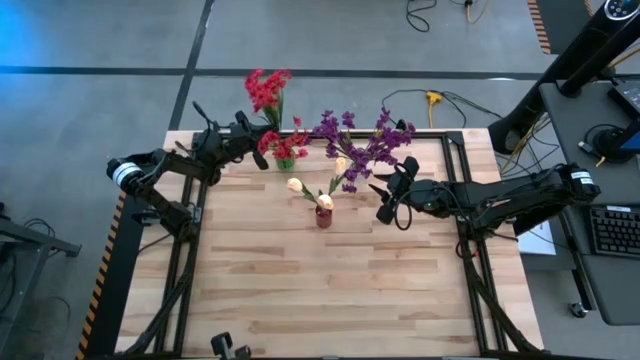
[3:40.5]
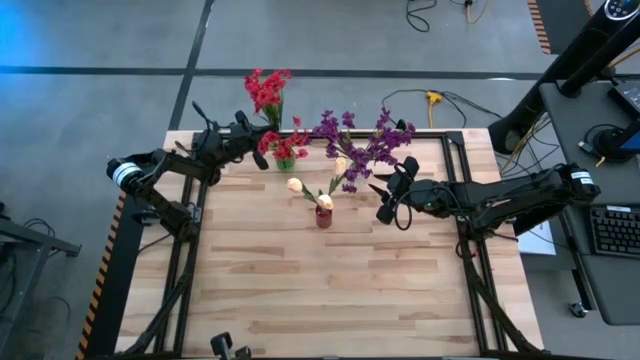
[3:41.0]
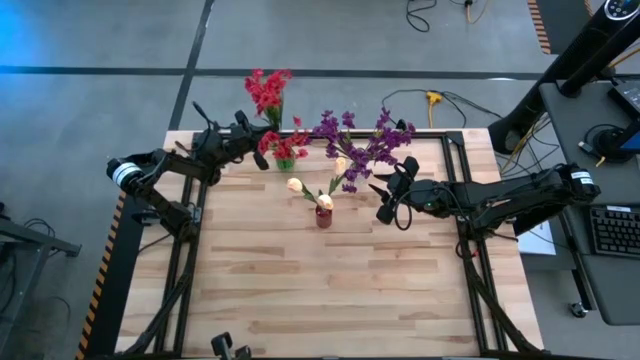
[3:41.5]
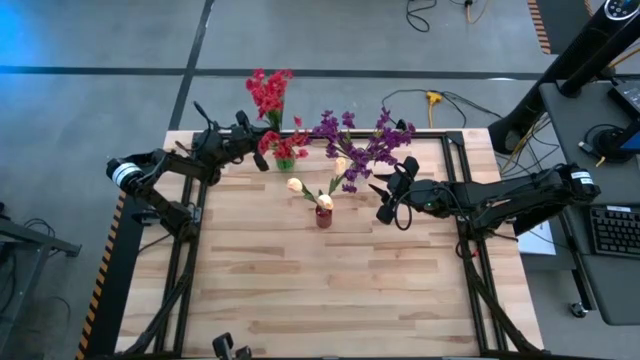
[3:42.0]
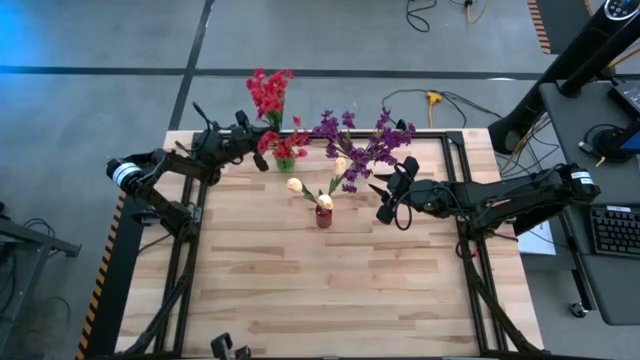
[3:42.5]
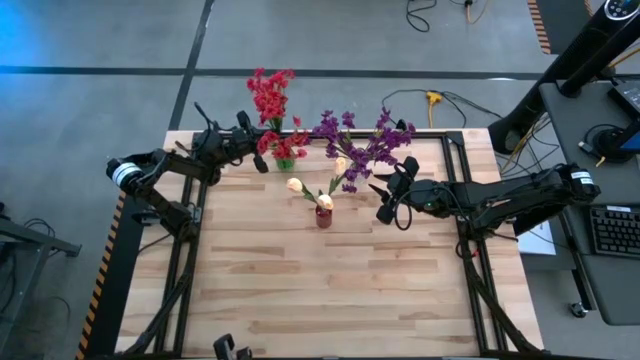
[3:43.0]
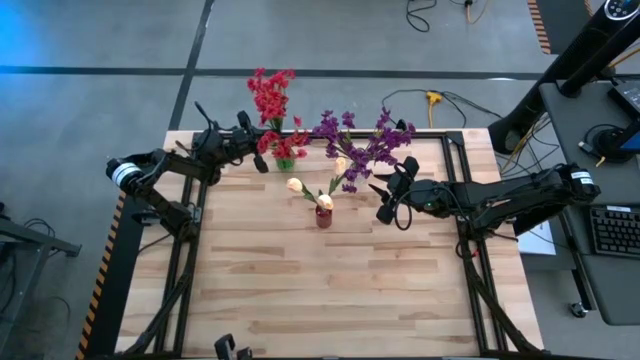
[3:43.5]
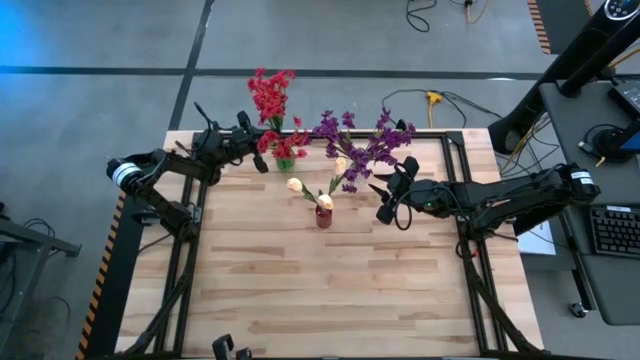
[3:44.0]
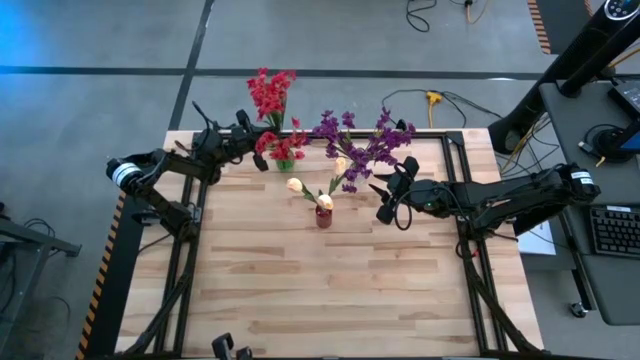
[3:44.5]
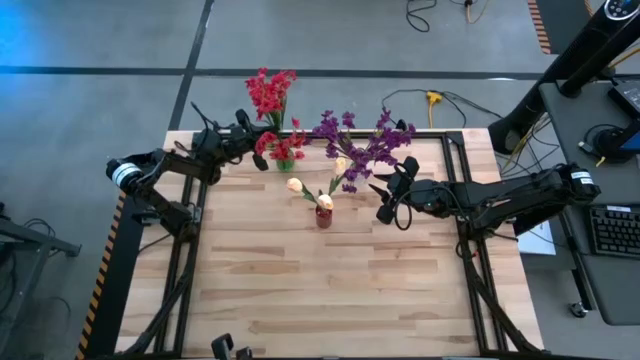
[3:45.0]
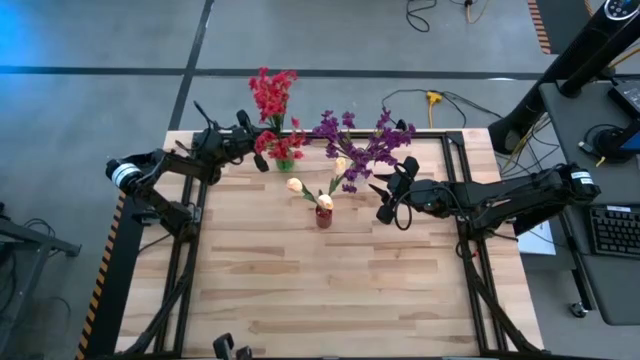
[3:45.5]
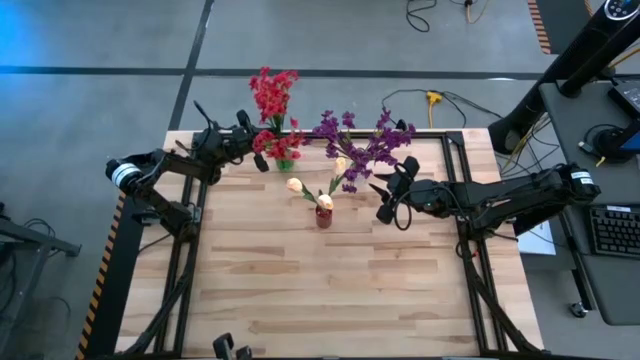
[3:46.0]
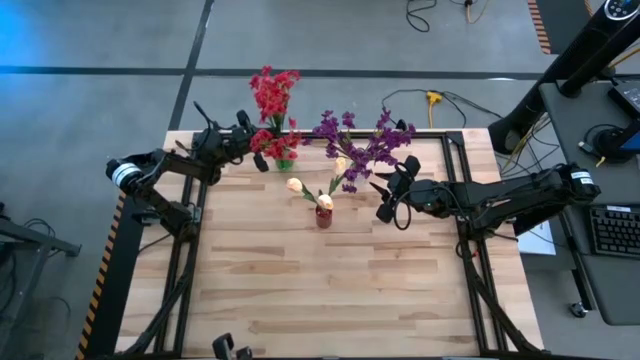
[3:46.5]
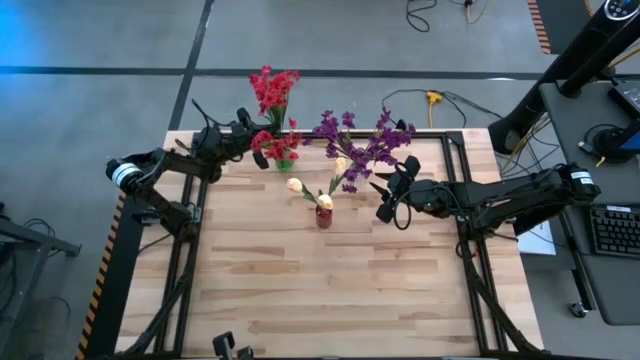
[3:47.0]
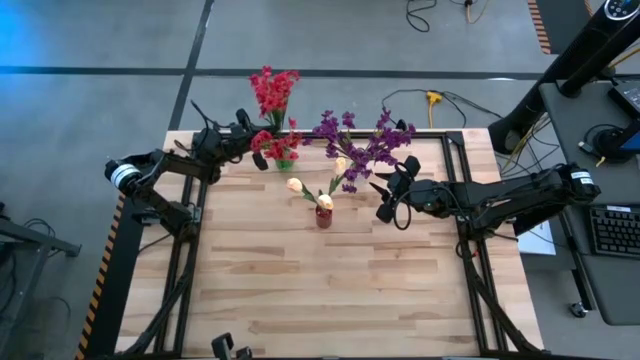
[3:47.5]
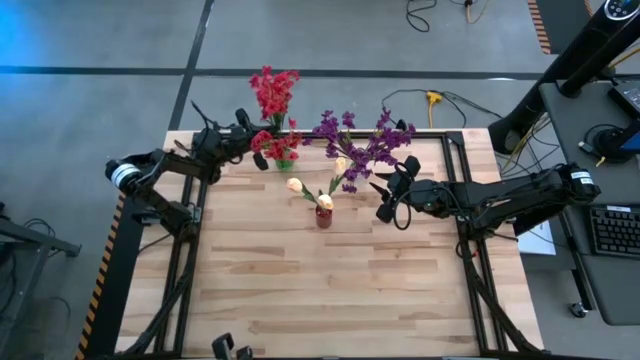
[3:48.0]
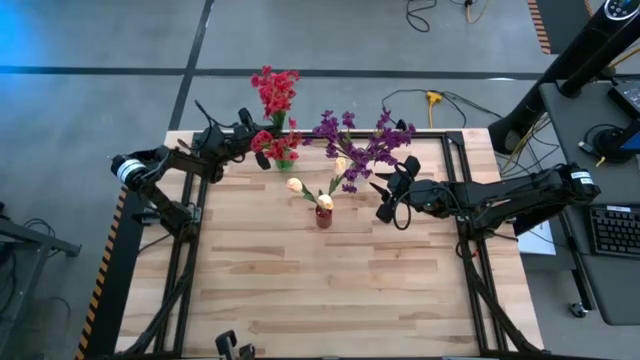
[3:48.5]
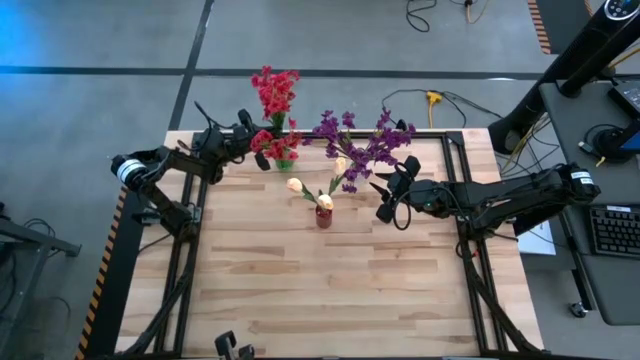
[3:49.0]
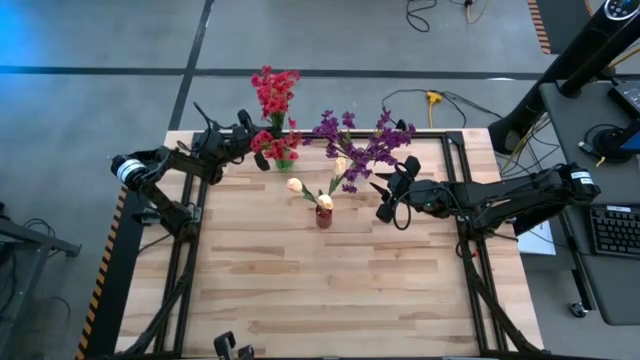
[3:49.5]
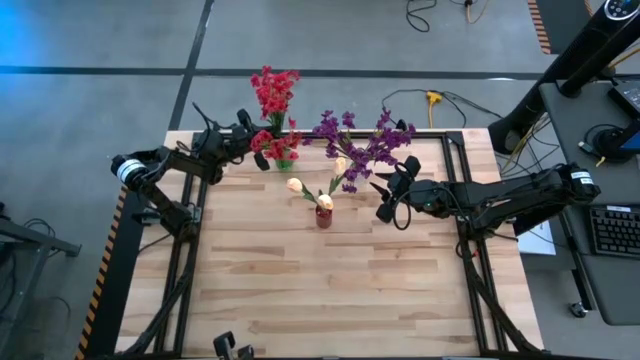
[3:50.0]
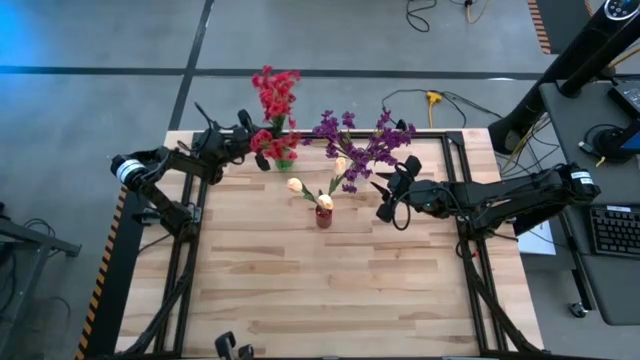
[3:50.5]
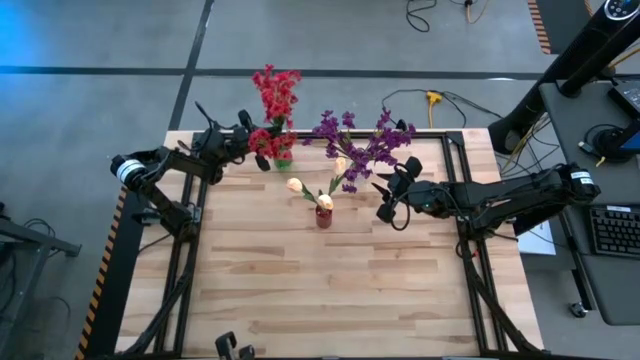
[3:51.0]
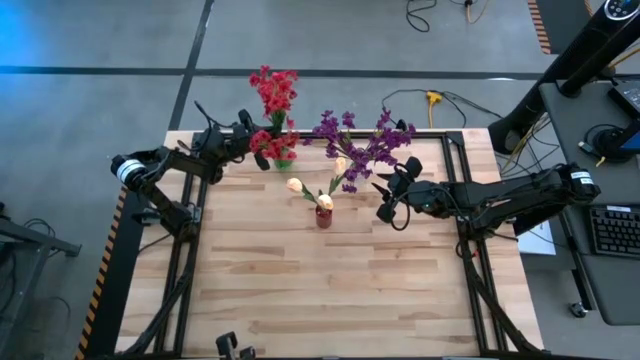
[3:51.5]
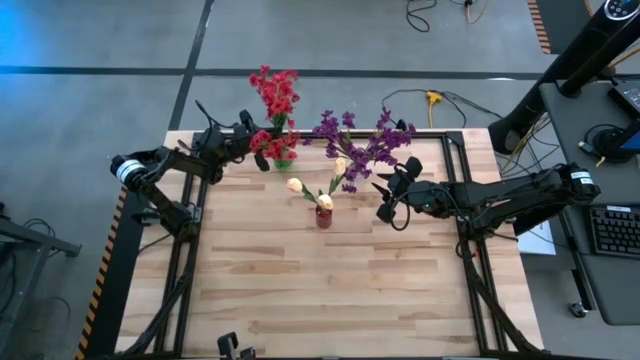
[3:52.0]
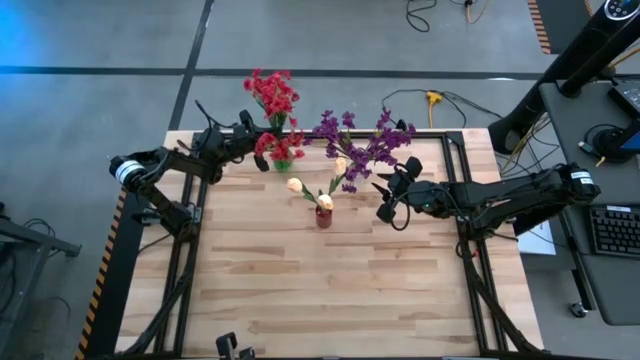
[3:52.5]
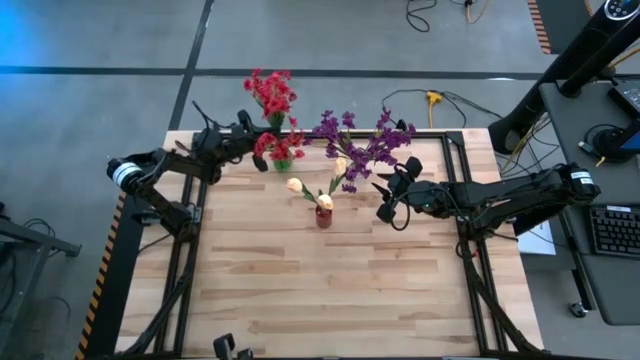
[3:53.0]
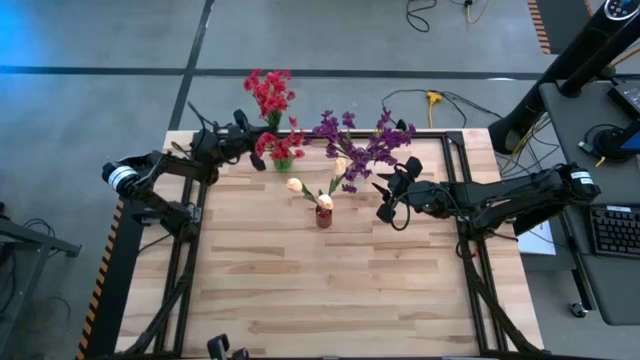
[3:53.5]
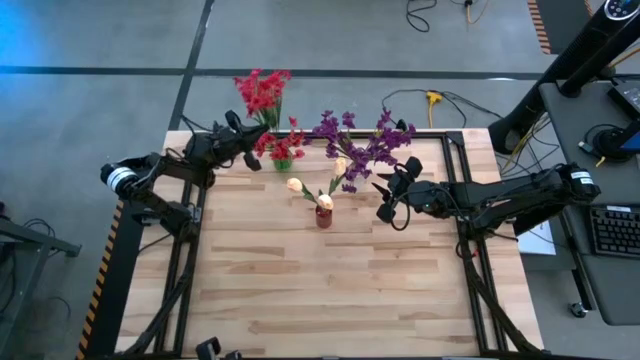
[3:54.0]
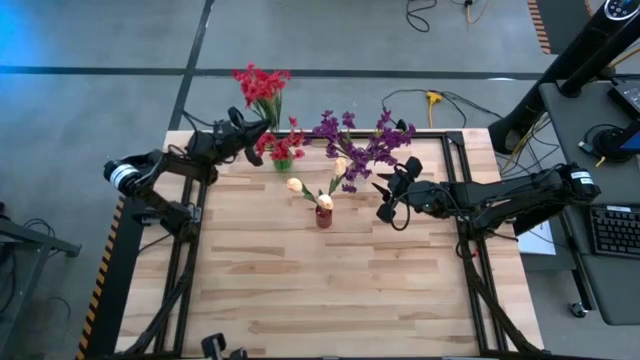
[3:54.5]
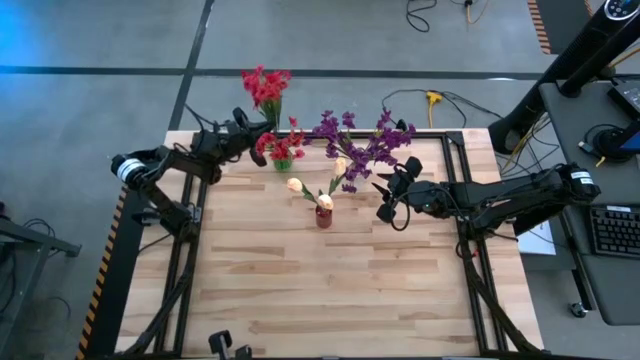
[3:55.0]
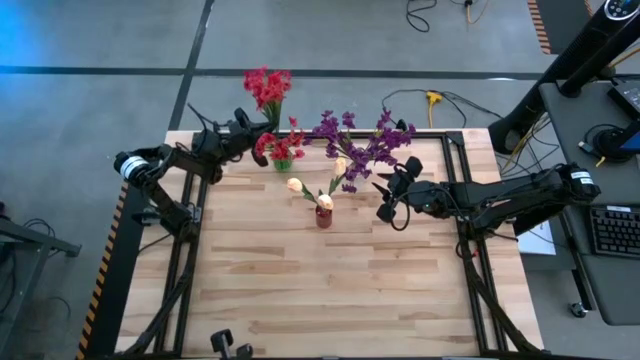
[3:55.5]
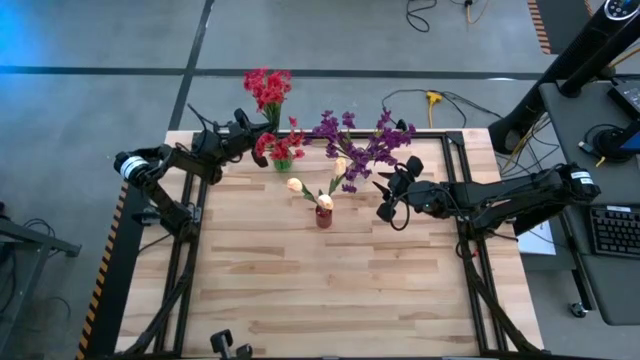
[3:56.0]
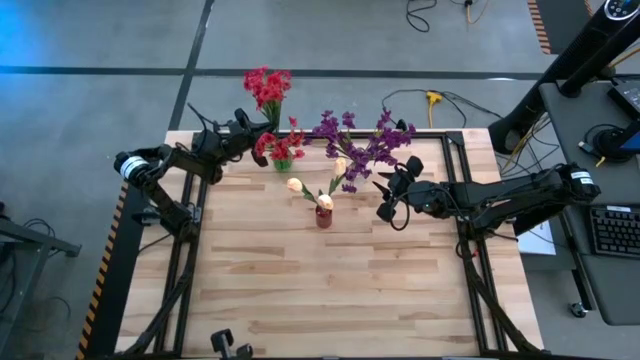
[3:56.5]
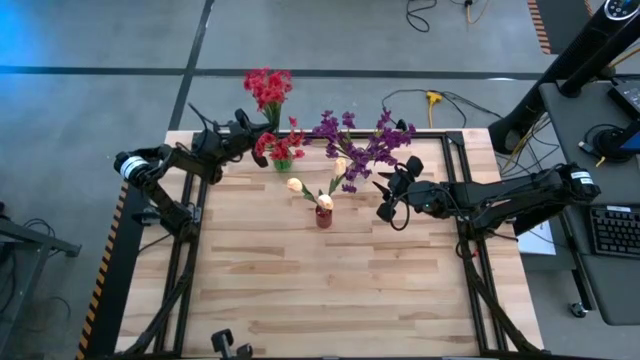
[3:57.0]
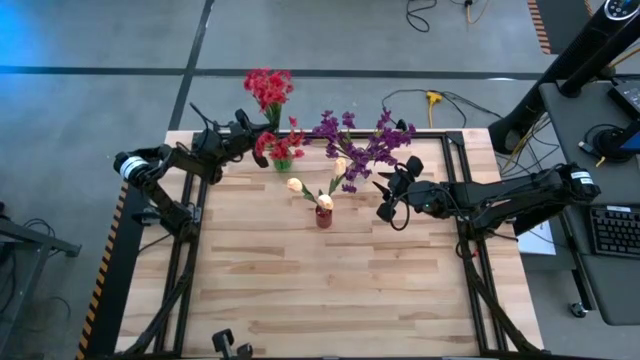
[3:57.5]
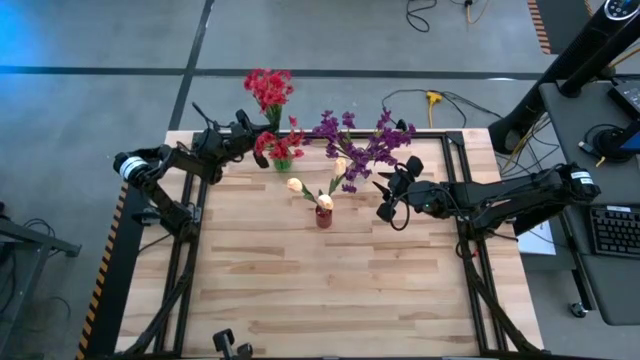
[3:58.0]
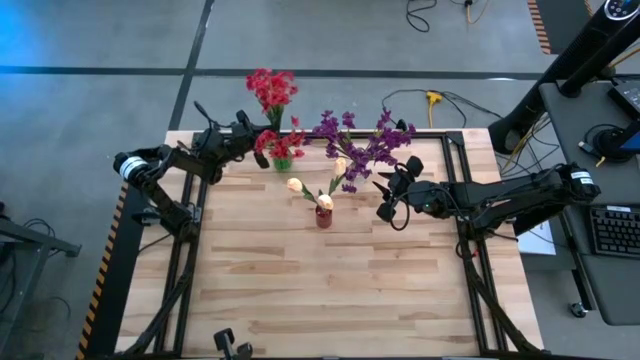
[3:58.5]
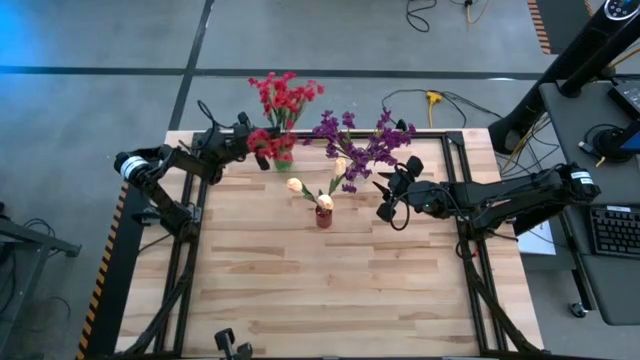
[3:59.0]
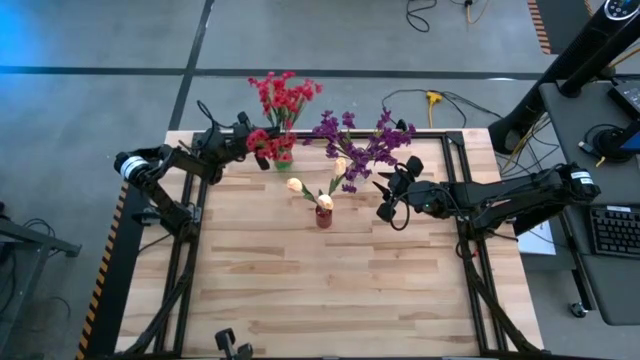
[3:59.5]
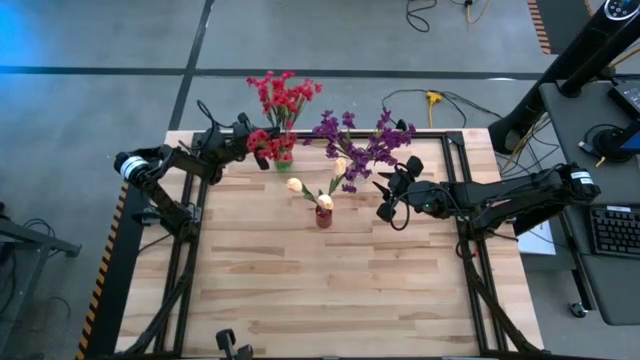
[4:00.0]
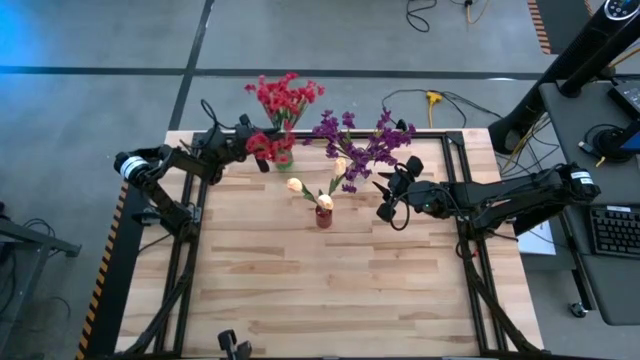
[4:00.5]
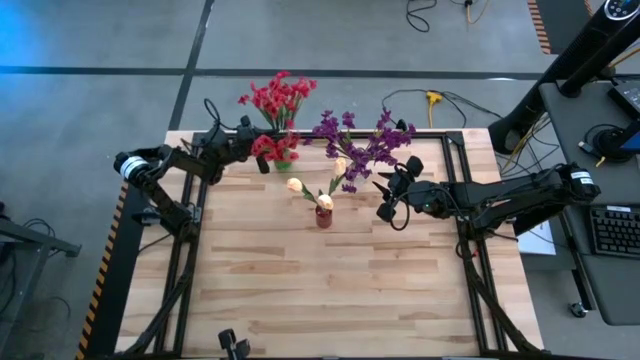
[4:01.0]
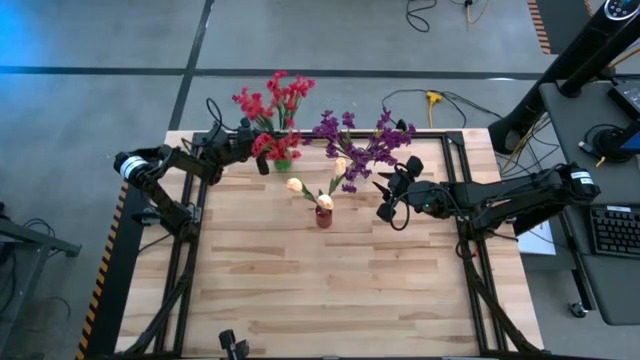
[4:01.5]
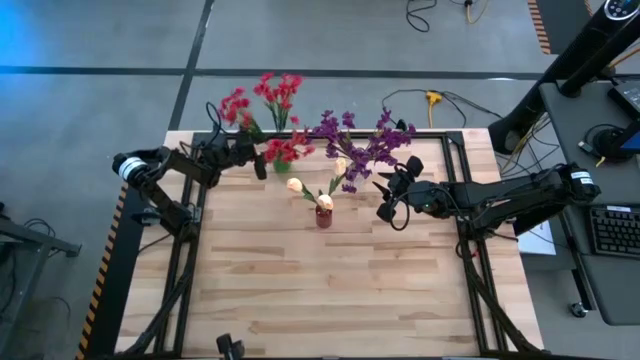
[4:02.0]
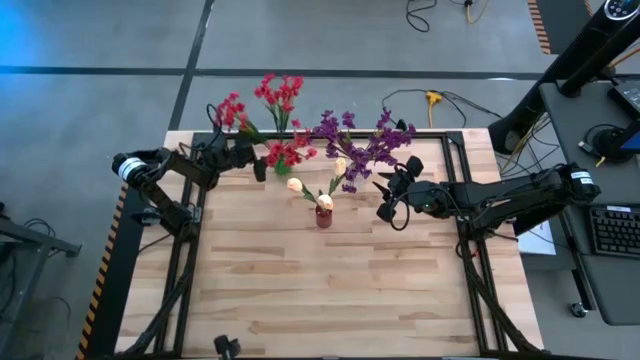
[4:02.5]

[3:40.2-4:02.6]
Task: Sort flowers into vase by color
Put the red flowers into the green vase
